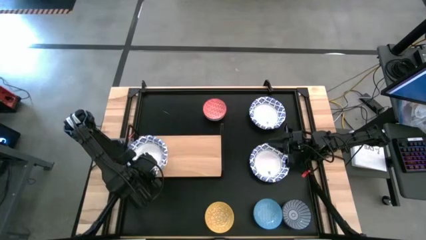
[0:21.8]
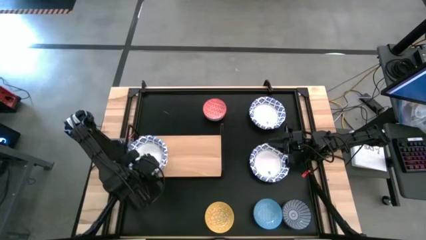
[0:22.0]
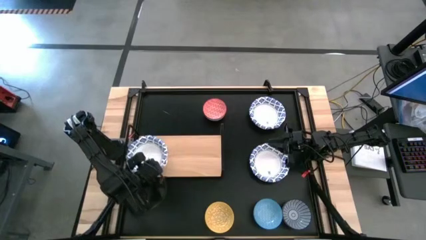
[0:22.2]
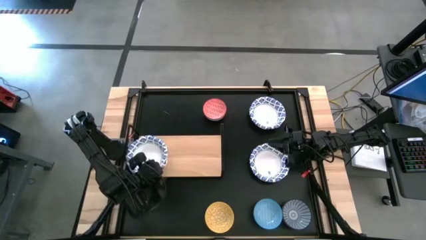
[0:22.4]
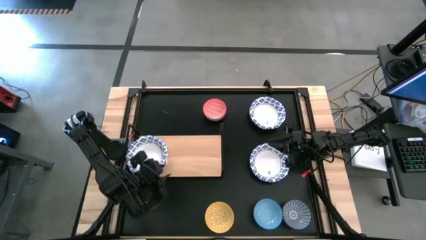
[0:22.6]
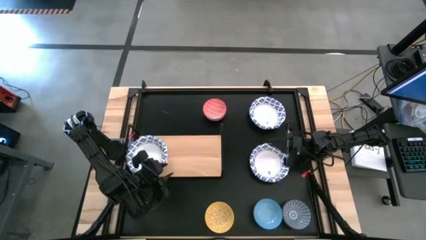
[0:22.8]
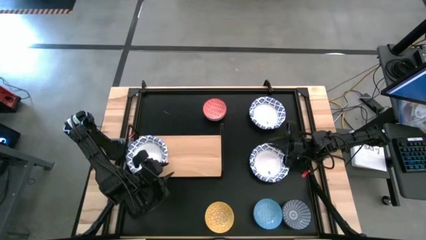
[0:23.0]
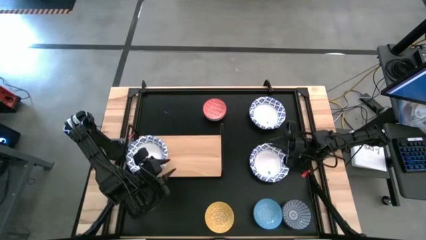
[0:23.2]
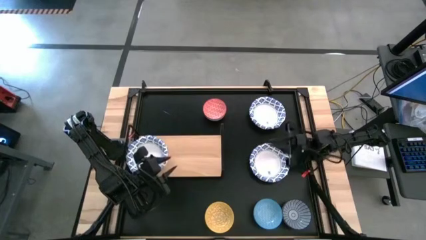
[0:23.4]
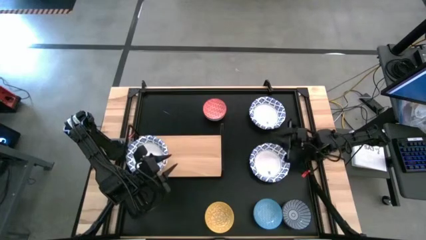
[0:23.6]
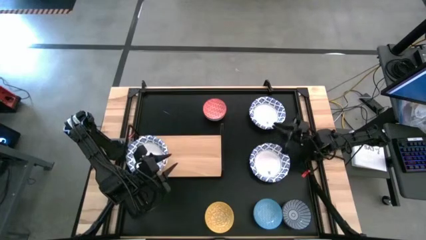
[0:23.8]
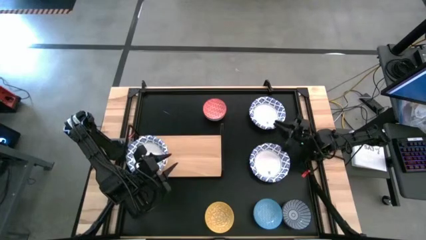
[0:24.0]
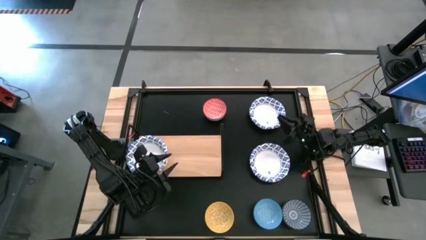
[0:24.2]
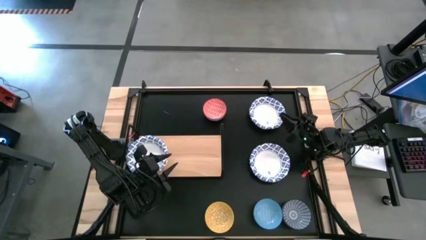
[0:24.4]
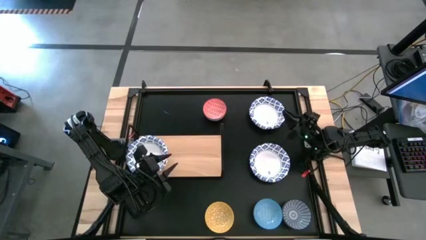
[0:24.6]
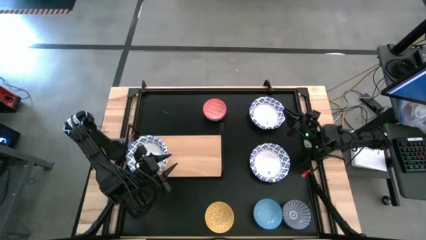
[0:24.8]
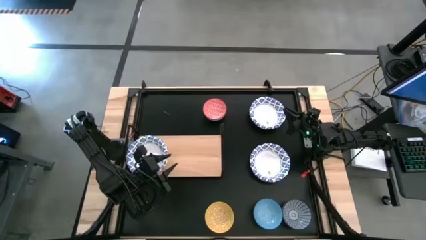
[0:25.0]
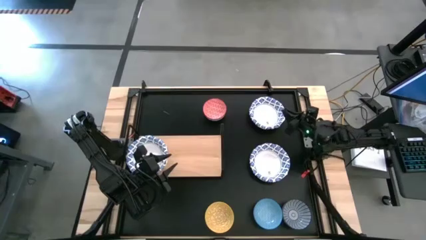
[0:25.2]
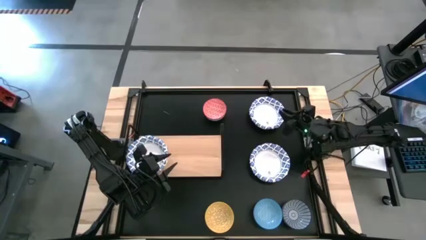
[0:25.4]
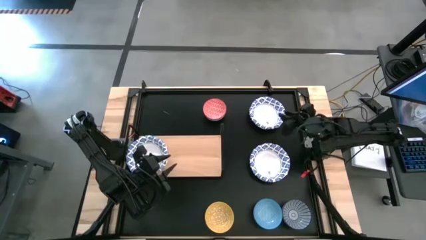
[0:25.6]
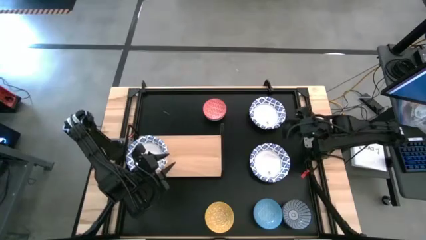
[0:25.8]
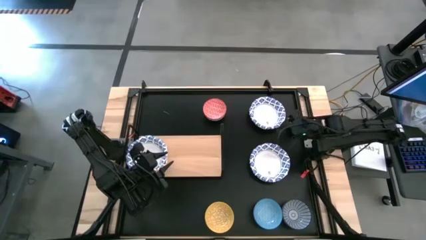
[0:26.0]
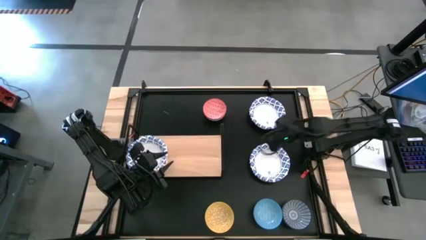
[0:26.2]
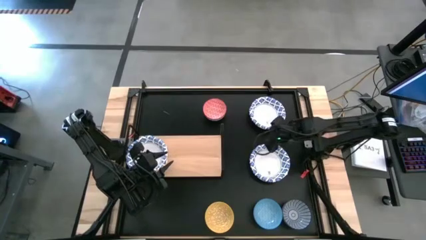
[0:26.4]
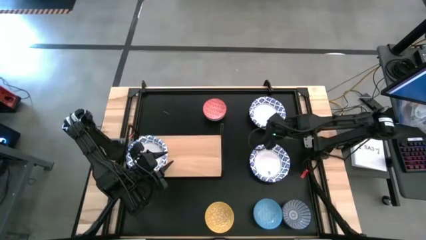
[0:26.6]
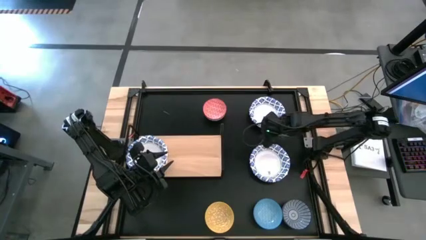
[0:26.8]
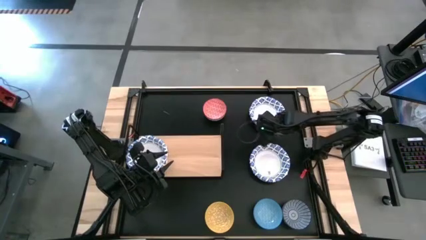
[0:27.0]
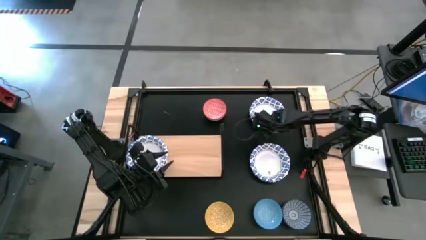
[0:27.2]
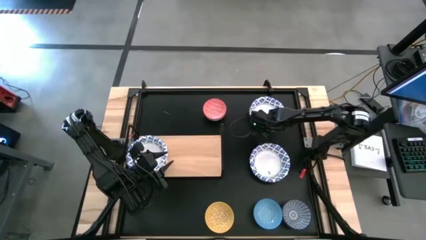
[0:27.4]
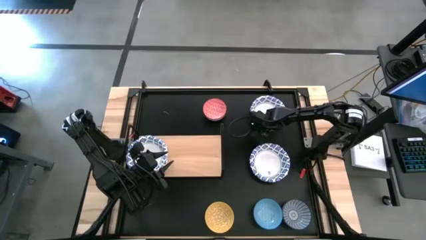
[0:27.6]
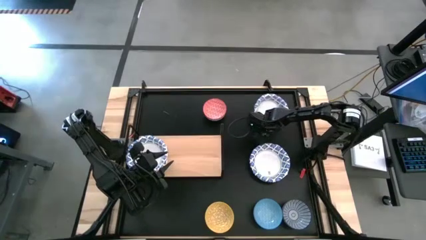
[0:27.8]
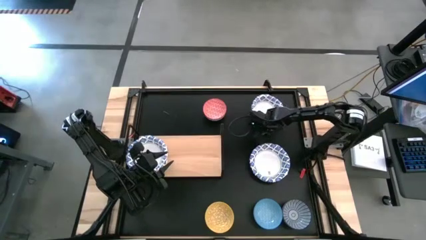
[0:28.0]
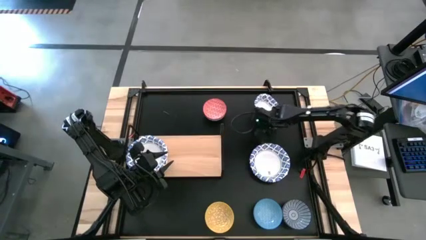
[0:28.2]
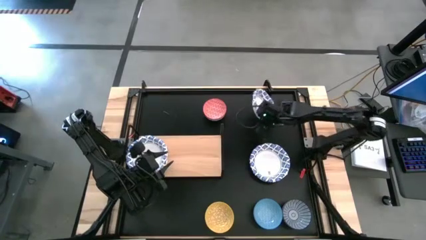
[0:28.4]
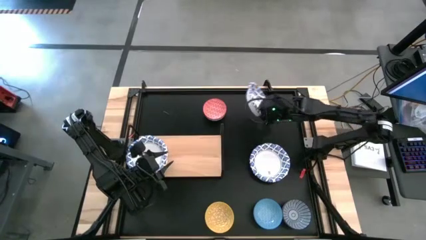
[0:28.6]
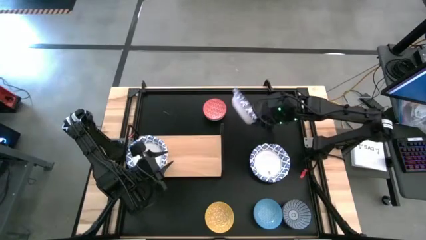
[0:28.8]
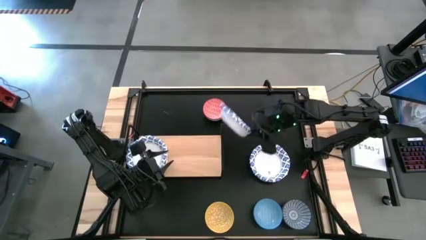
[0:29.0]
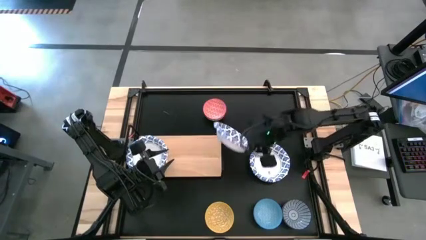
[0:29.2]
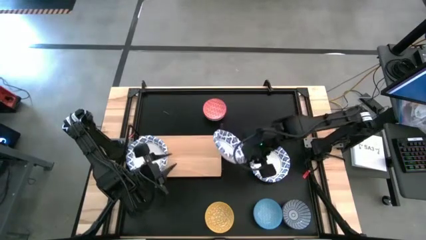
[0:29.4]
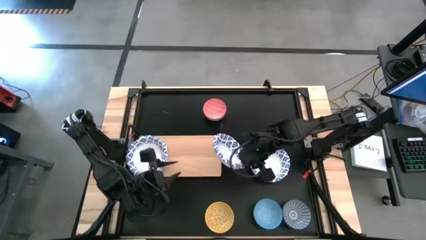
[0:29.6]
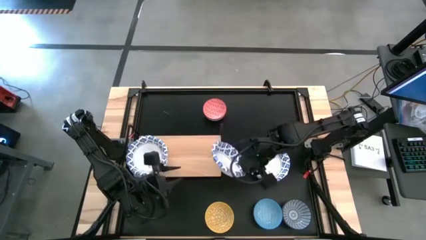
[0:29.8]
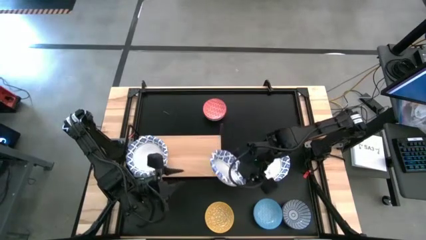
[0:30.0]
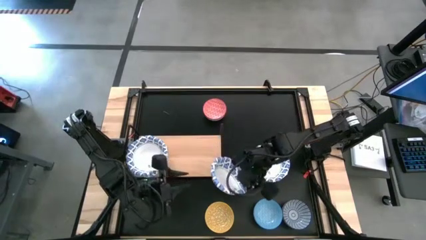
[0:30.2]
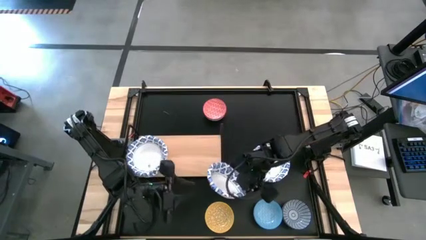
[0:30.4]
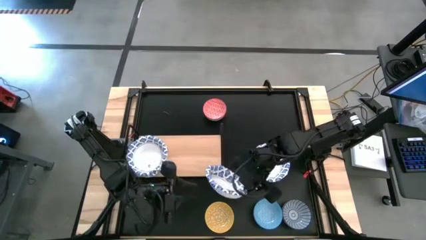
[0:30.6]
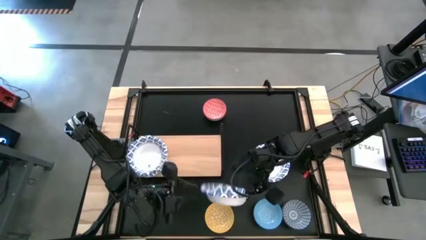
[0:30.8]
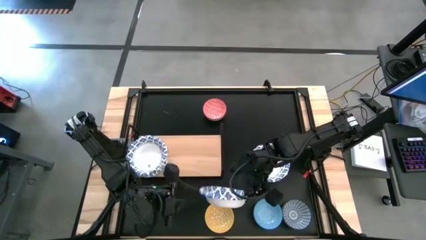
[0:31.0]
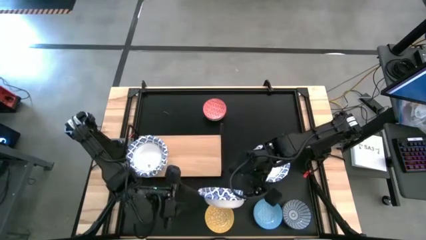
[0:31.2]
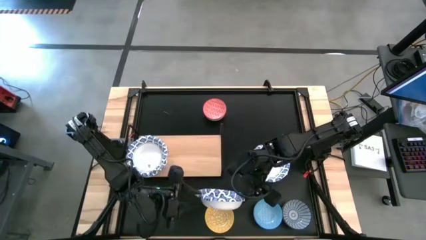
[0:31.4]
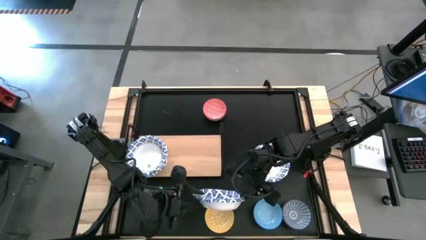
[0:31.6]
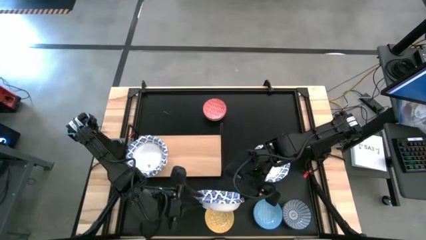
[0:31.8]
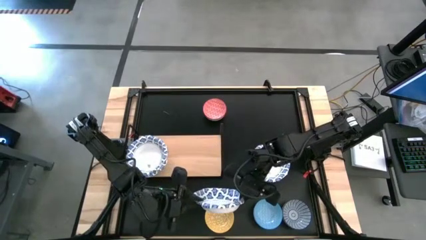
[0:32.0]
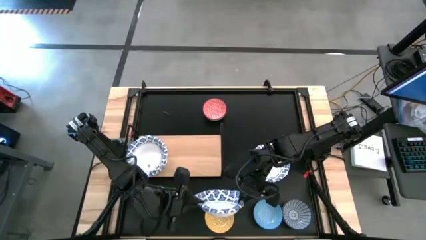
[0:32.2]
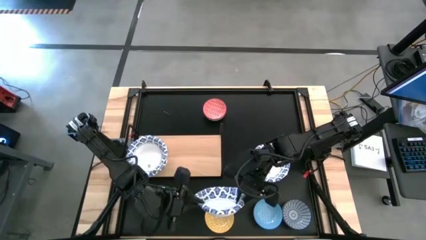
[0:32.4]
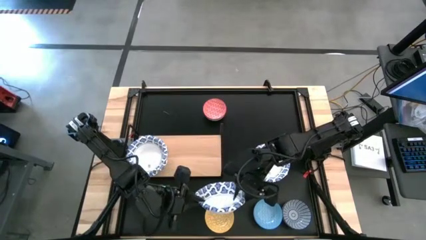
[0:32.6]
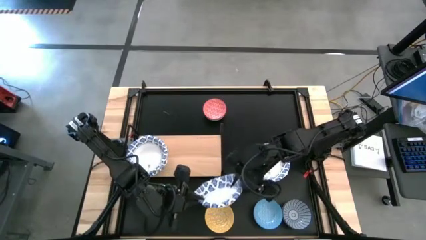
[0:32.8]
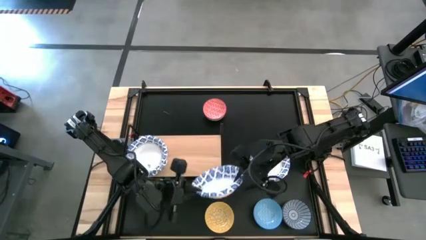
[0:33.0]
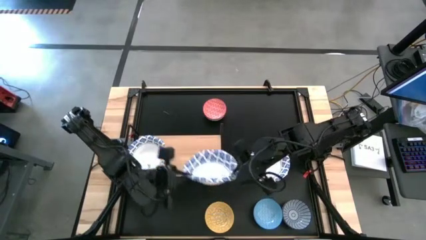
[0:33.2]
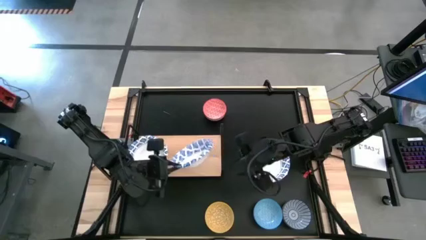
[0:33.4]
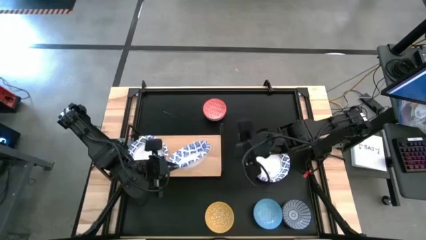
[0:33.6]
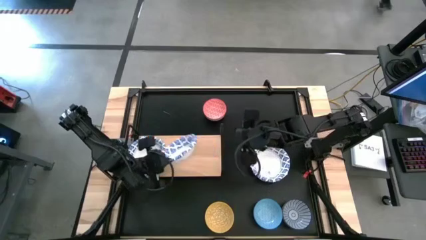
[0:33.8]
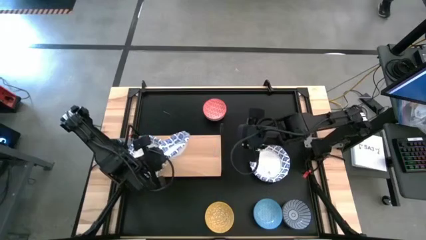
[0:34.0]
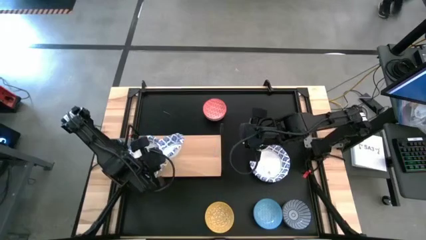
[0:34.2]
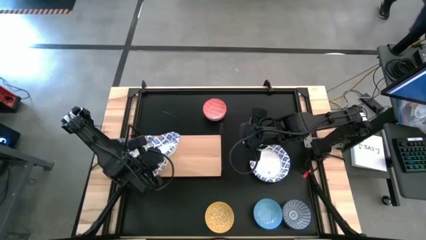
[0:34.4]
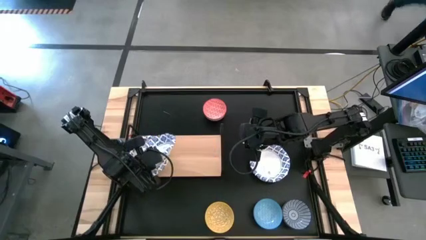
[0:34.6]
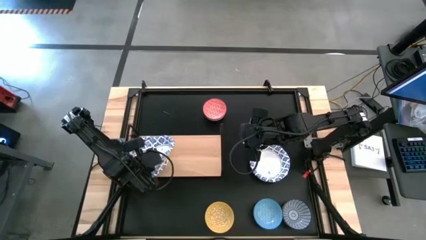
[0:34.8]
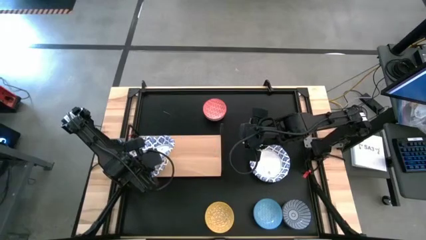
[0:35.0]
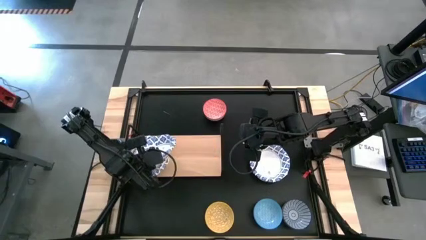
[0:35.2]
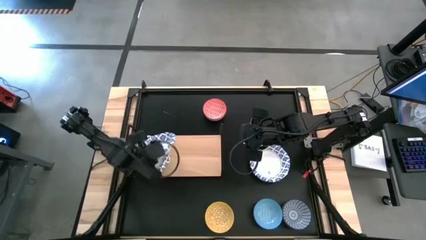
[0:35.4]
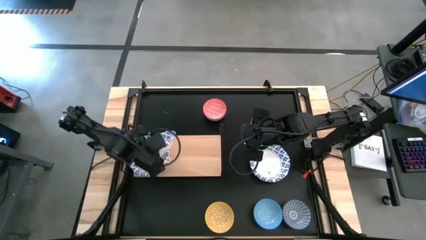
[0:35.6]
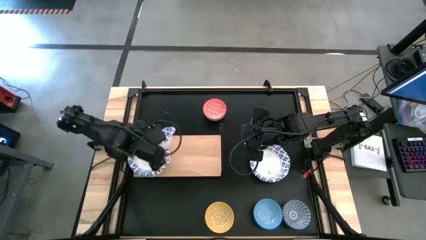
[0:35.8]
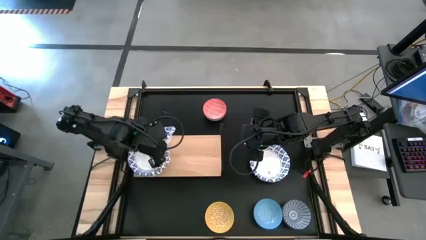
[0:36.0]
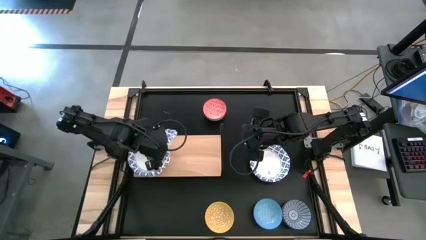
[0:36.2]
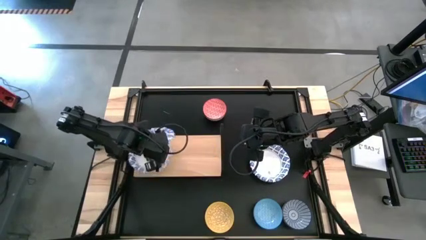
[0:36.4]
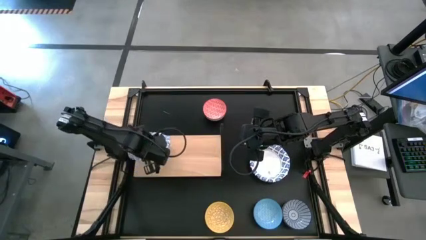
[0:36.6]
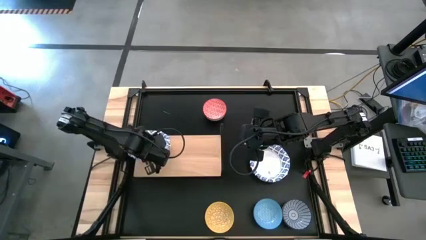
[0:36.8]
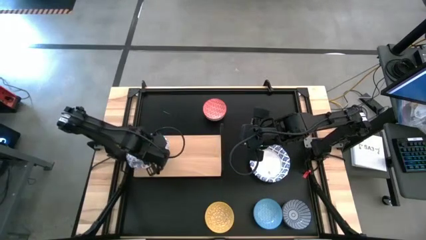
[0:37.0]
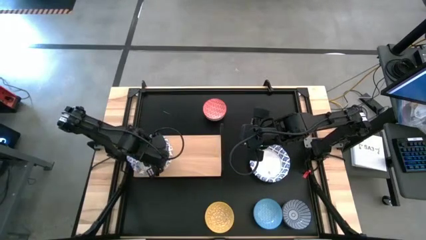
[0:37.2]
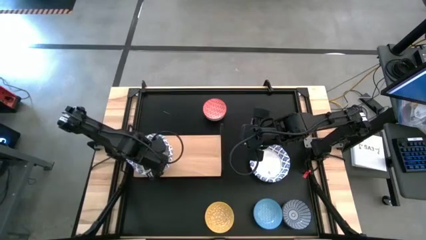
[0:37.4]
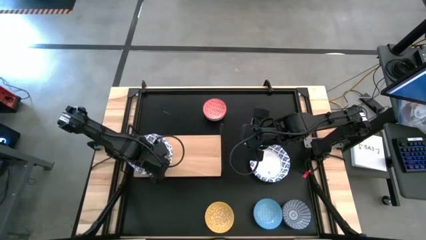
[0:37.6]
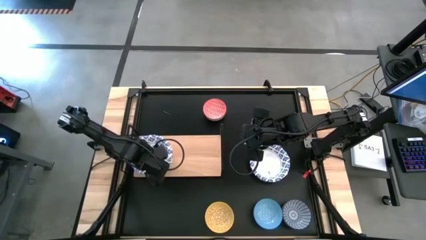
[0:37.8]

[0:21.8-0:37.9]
Task: Place and stack bowls onto a shelf
Stack the blue patterned bowl on top of the blue patterned bowl on the shelf
